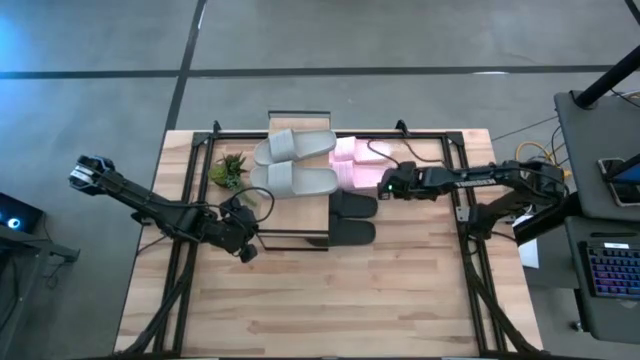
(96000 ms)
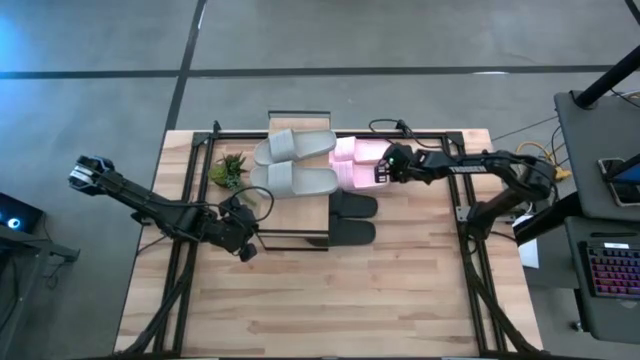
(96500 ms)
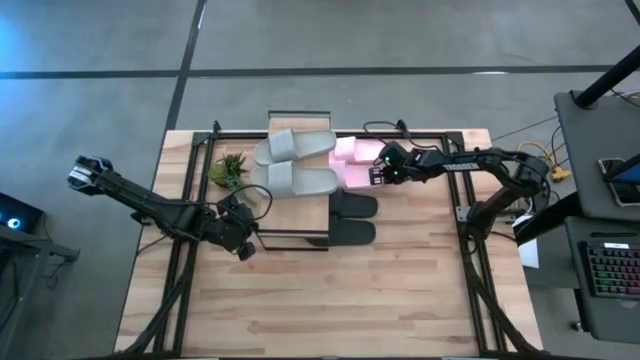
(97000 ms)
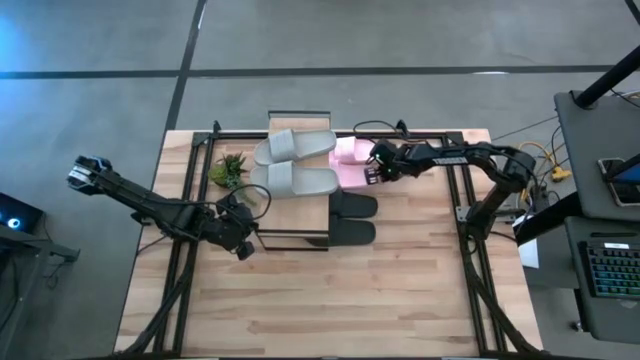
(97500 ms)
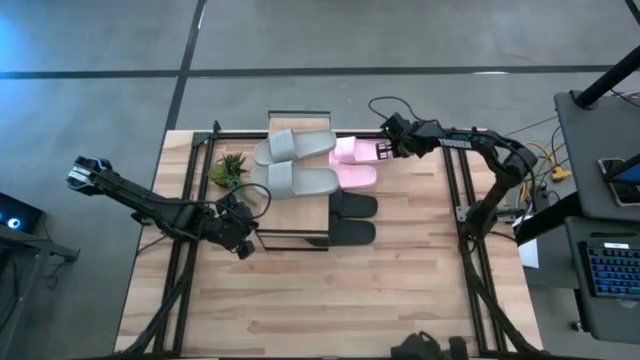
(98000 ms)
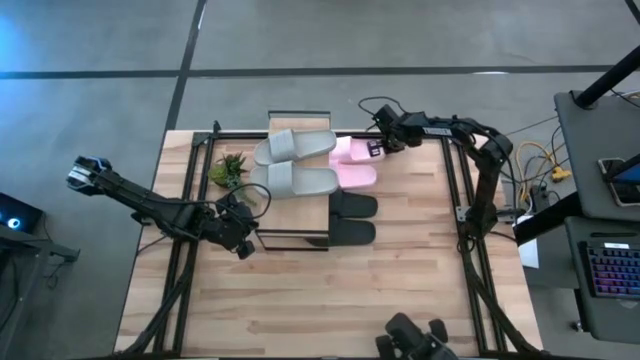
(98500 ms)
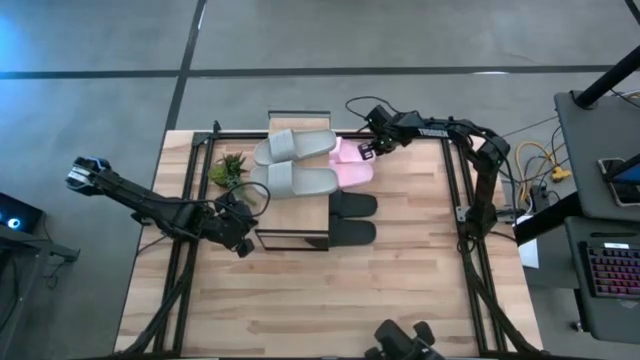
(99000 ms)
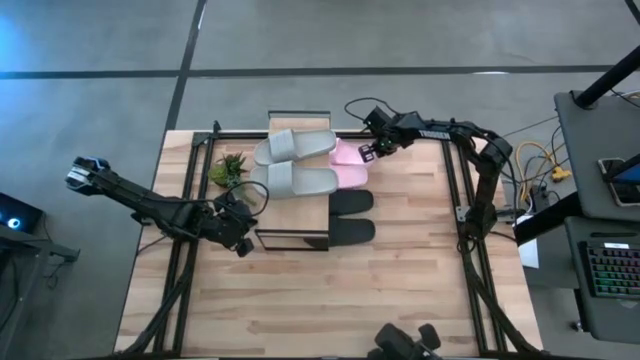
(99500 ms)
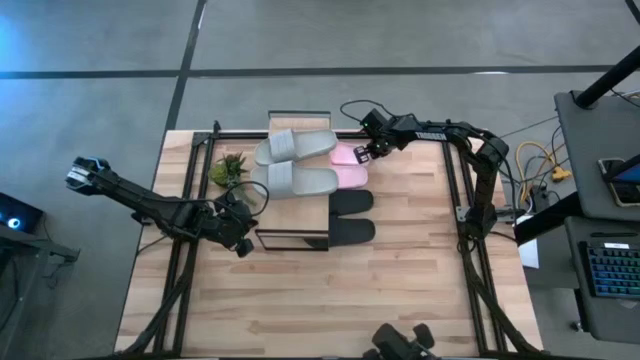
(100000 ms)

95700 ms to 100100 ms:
Task: Pick and place slides into the shelf
Adjust the pink slides under the shelf

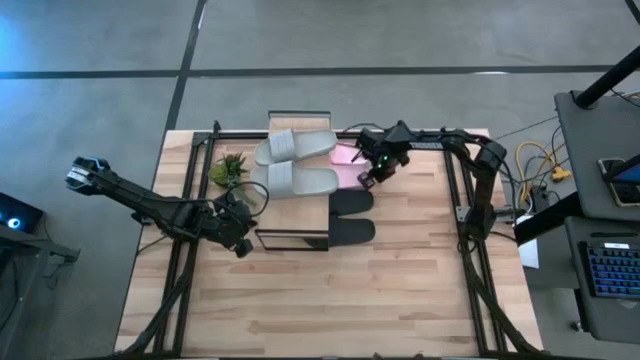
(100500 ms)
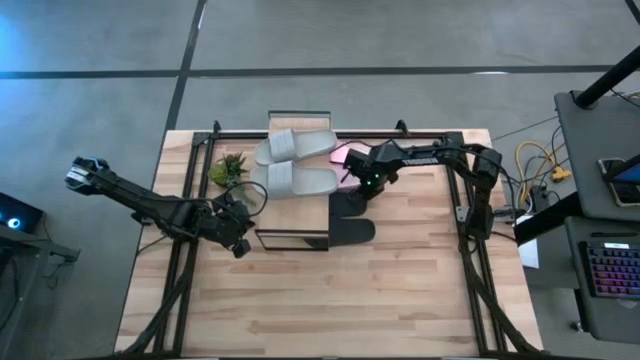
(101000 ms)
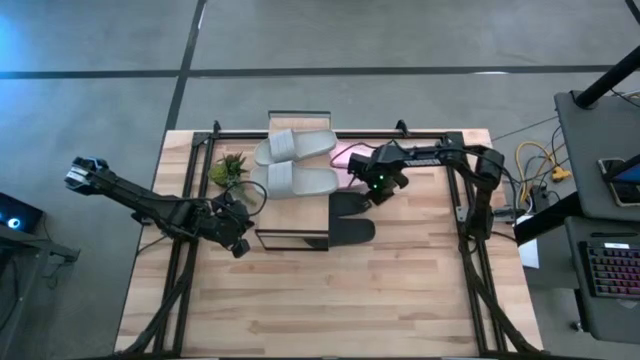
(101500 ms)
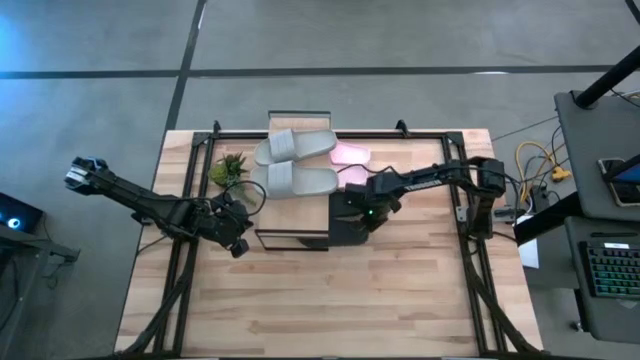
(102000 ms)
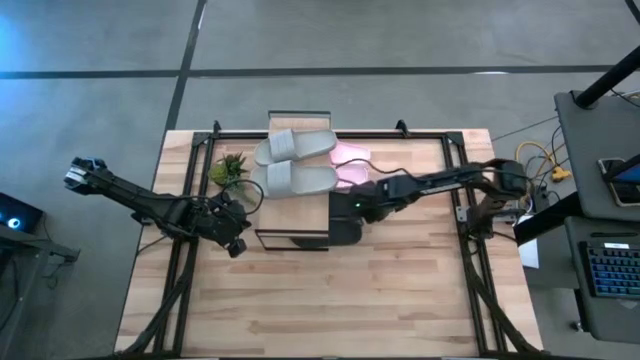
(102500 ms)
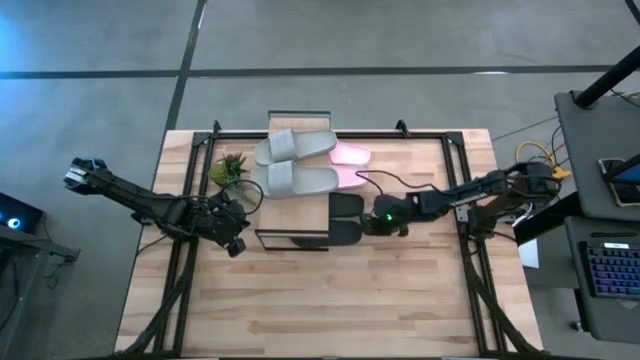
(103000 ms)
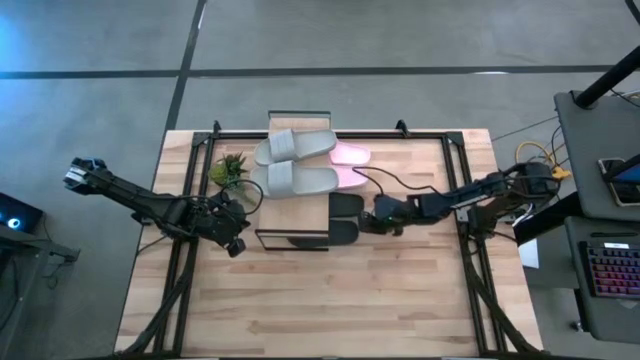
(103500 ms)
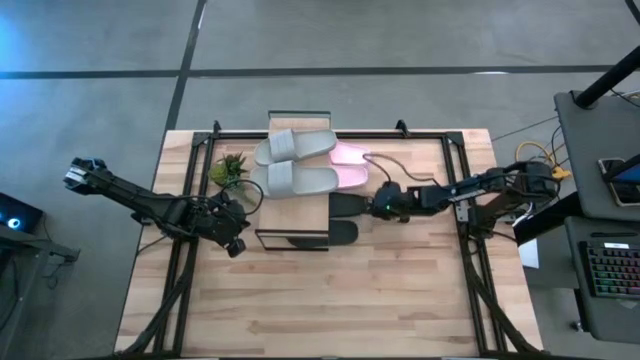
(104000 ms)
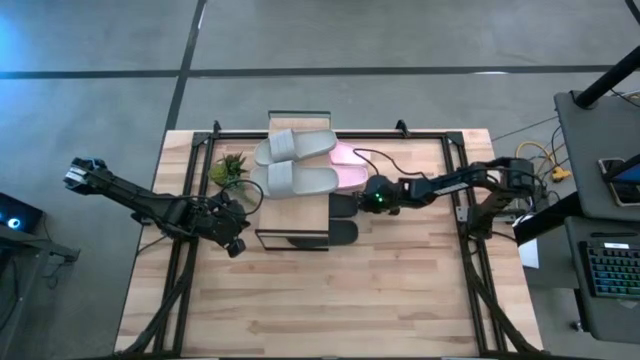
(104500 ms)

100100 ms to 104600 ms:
Adjust the black slides under the shelf

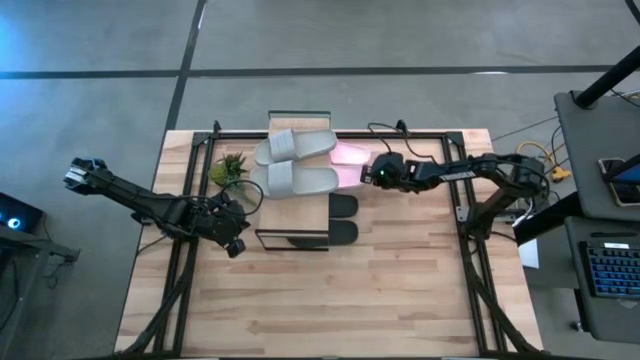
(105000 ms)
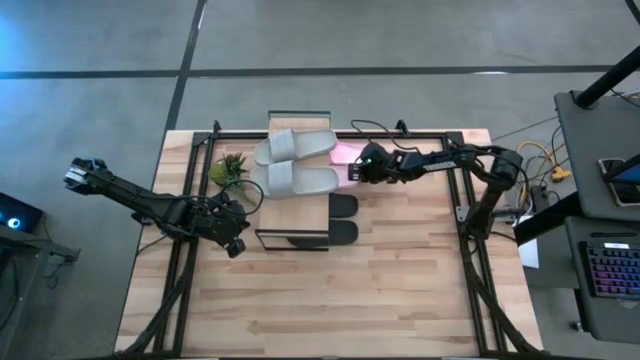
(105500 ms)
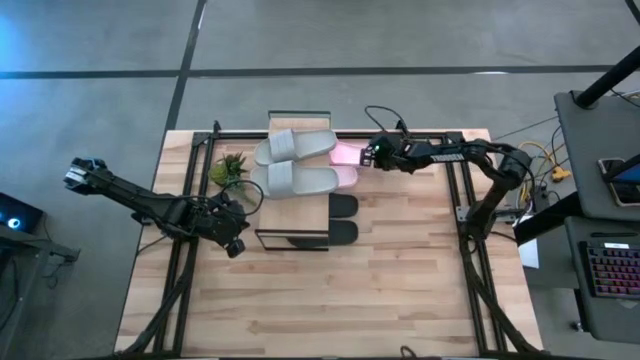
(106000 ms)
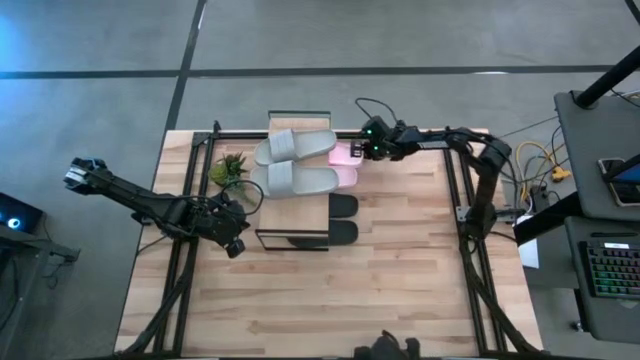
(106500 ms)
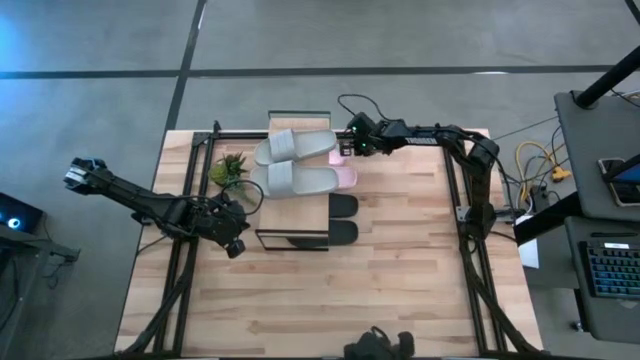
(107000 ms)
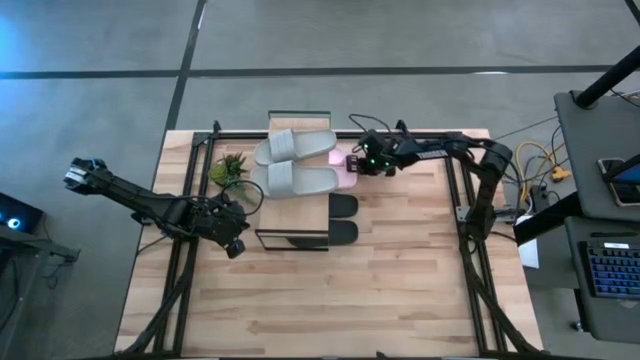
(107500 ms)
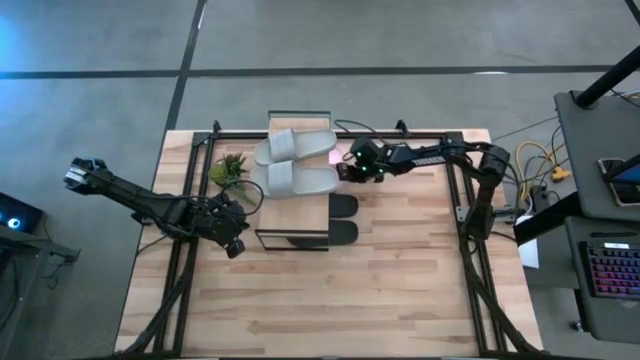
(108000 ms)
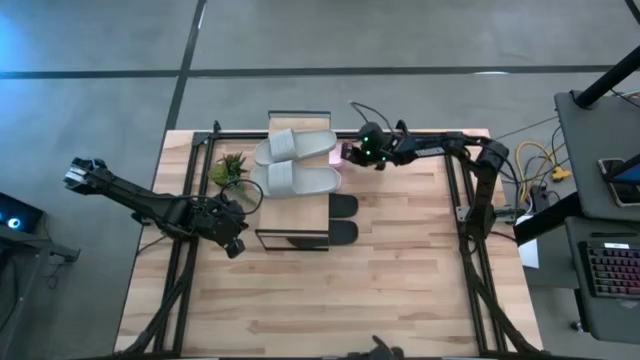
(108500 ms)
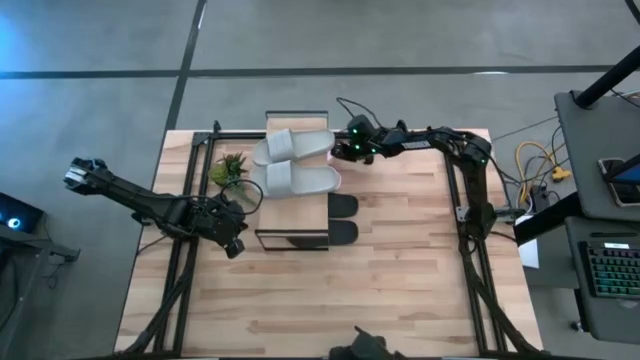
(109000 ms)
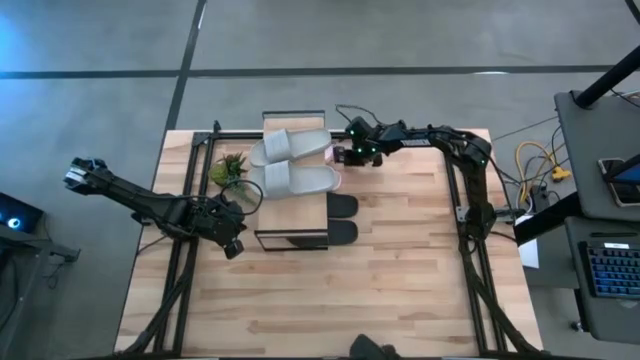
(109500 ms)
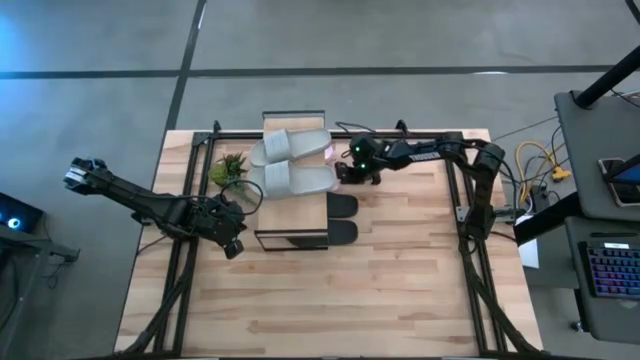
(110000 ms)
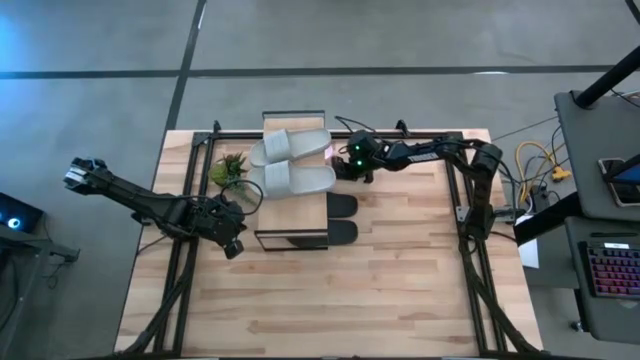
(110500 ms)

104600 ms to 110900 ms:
Adjust the pink slides under the shelf

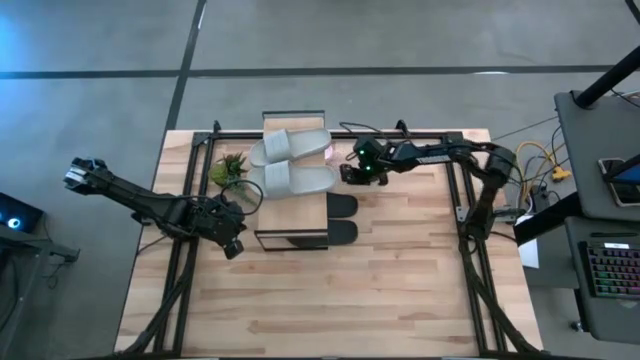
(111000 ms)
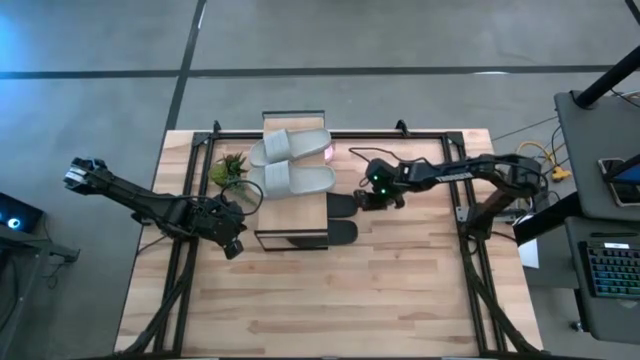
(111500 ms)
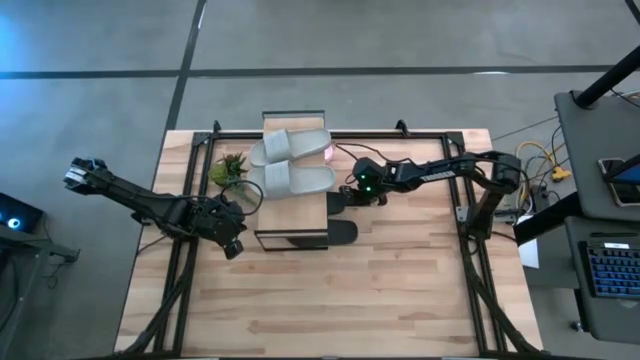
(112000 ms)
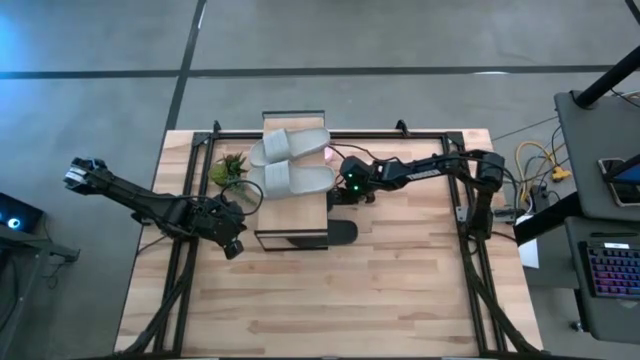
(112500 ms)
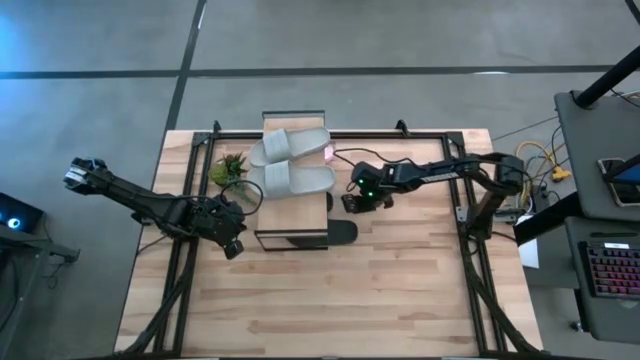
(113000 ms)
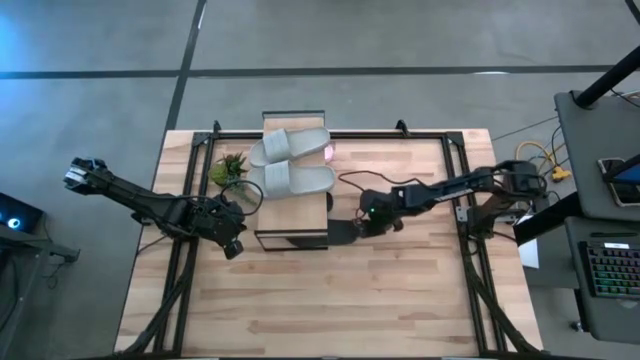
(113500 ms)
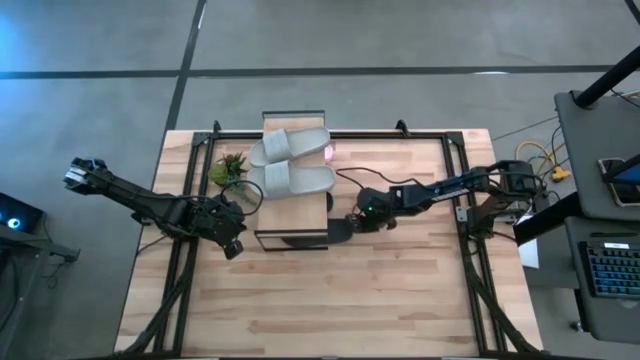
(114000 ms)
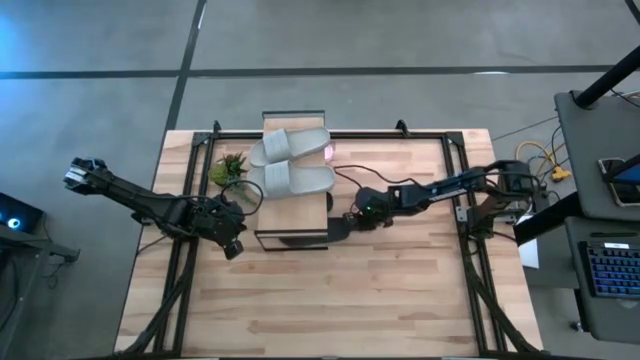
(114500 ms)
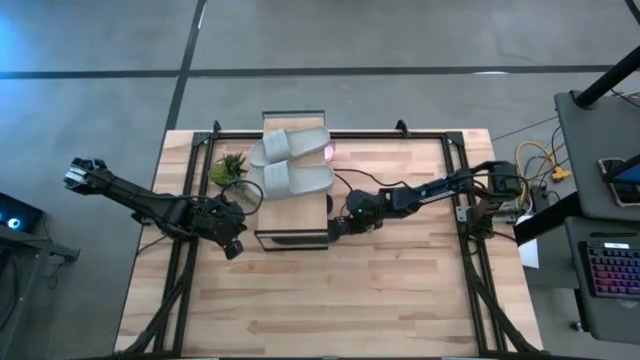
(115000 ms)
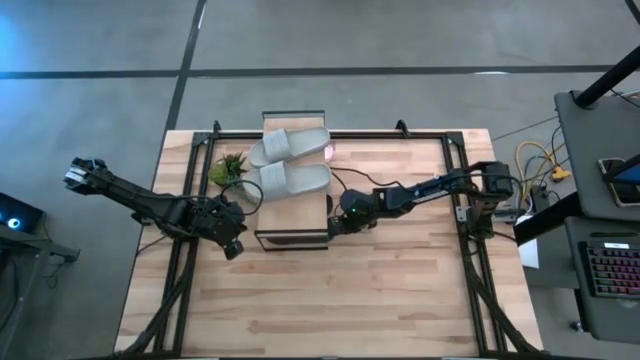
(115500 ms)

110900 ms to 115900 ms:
Adjust the black slides under the shelf

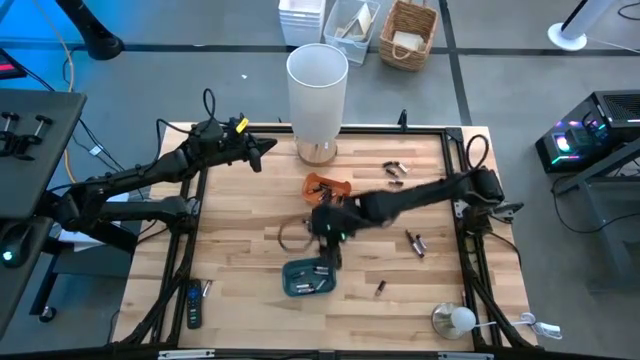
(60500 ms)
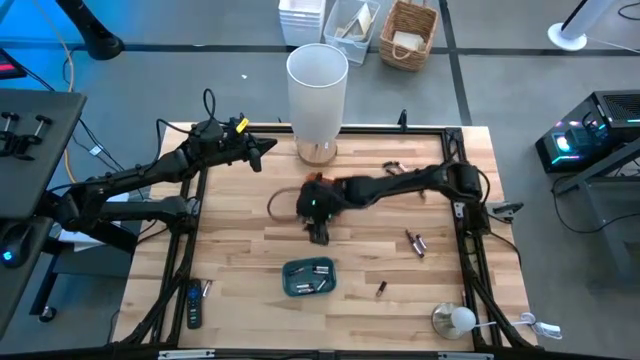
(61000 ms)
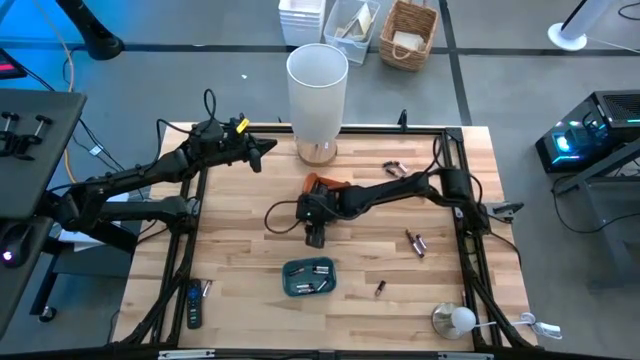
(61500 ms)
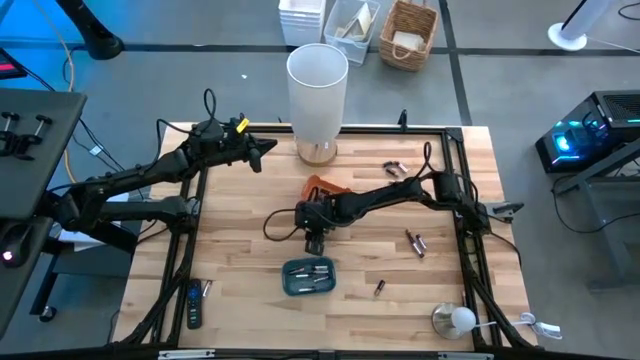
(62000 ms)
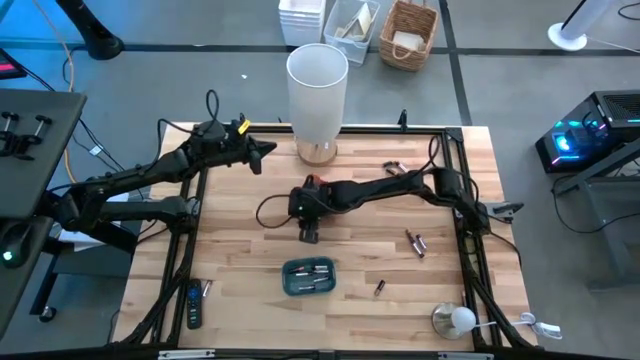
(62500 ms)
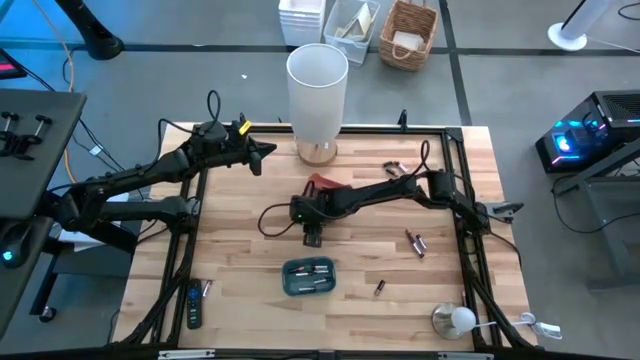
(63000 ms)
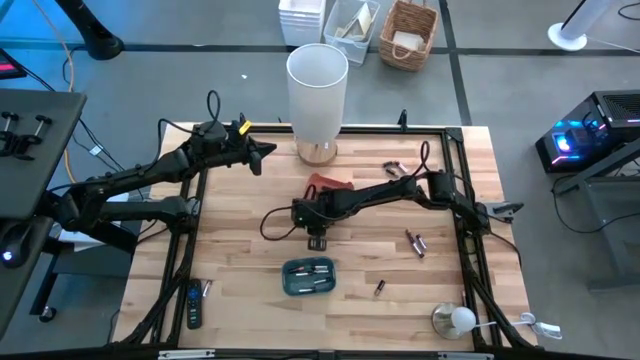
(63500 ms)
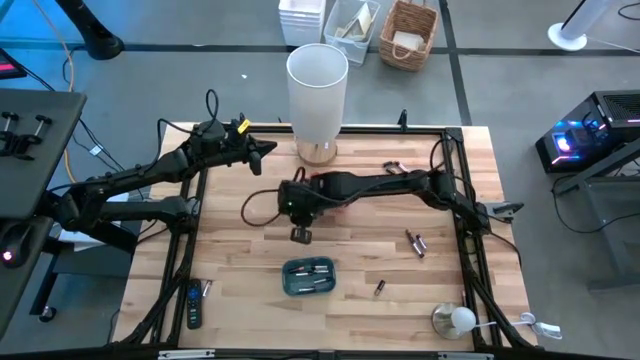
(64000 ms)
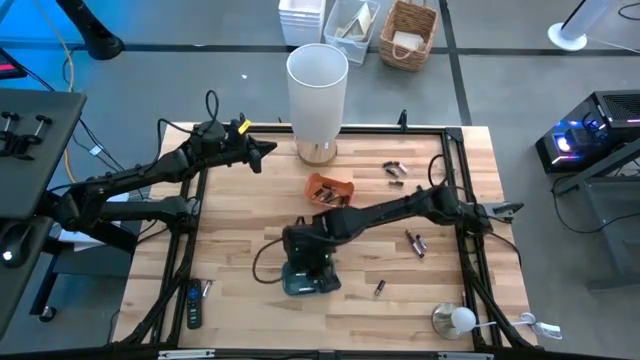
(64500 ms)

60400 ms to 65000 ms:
Task: Sort batteries
Put the silver battery into the blue bin
